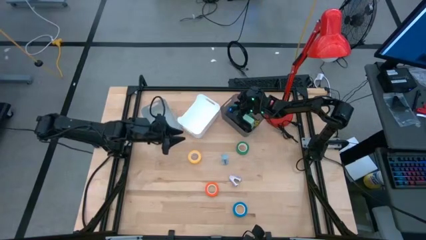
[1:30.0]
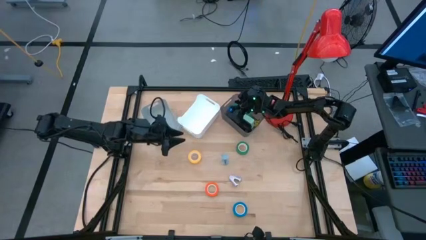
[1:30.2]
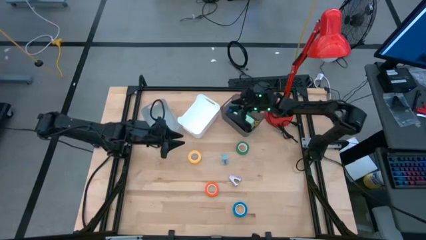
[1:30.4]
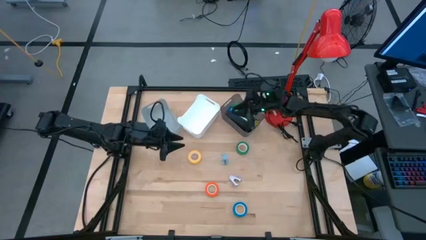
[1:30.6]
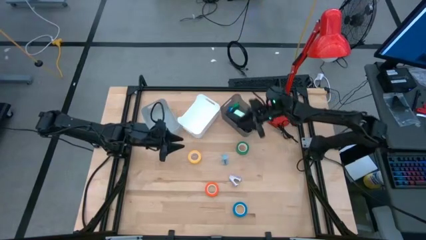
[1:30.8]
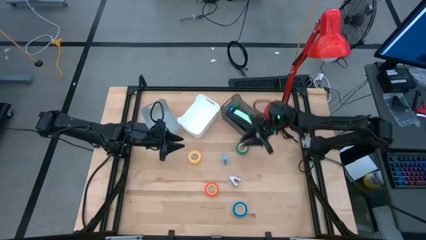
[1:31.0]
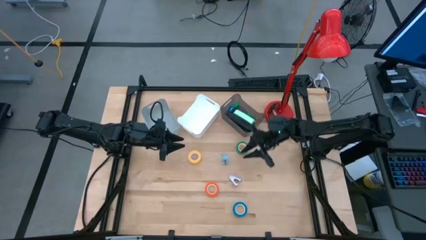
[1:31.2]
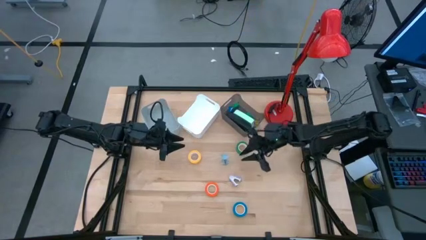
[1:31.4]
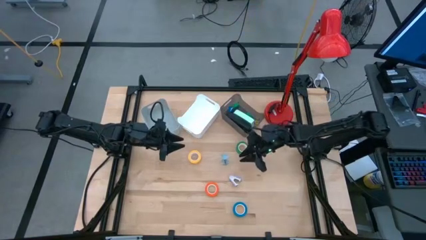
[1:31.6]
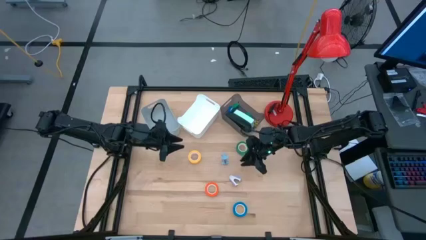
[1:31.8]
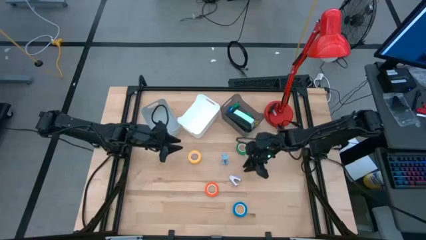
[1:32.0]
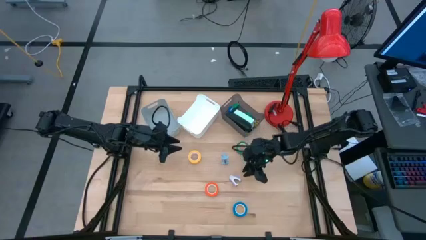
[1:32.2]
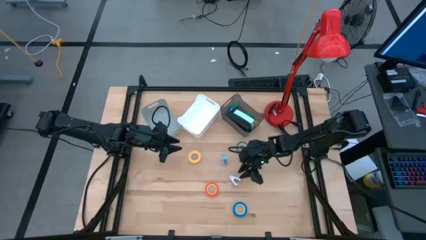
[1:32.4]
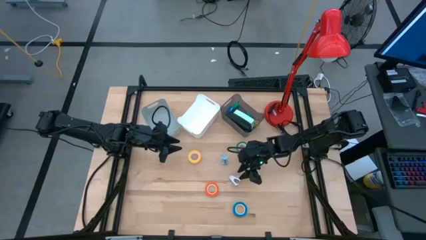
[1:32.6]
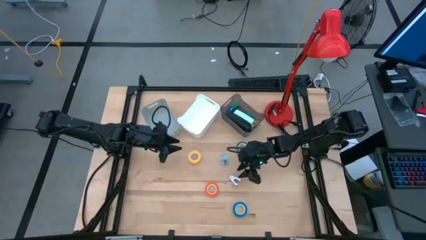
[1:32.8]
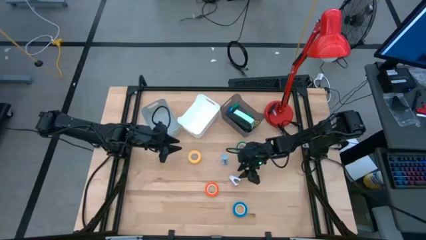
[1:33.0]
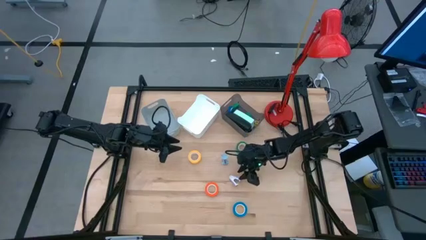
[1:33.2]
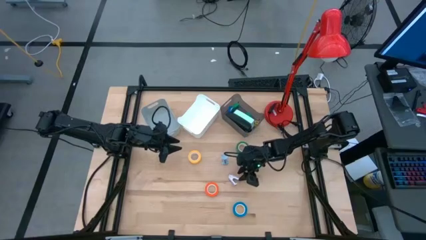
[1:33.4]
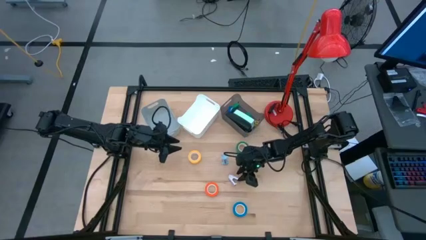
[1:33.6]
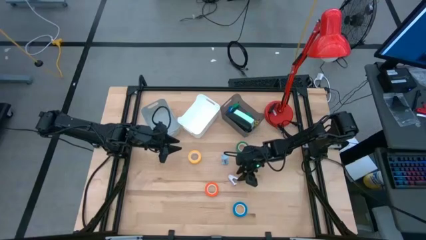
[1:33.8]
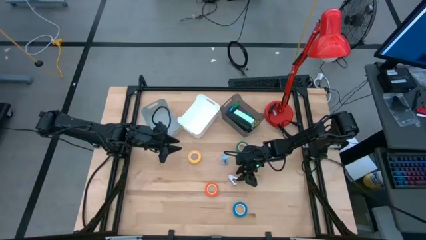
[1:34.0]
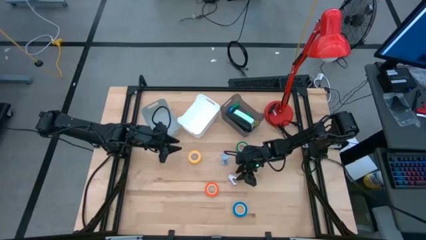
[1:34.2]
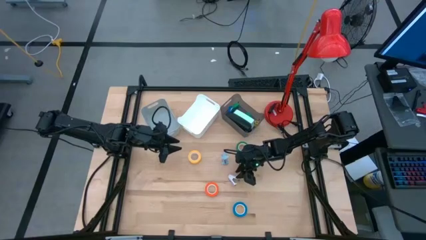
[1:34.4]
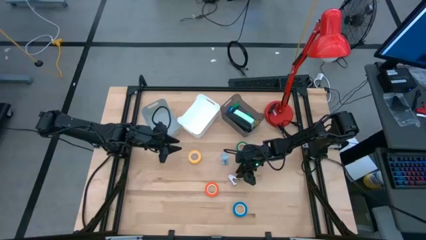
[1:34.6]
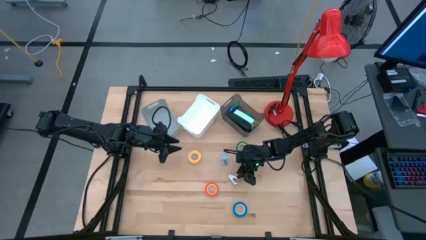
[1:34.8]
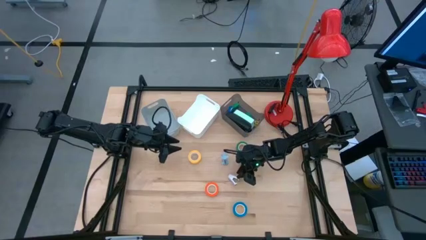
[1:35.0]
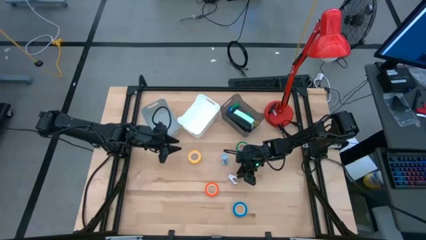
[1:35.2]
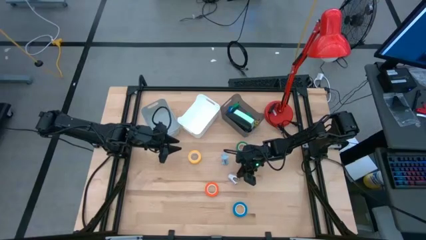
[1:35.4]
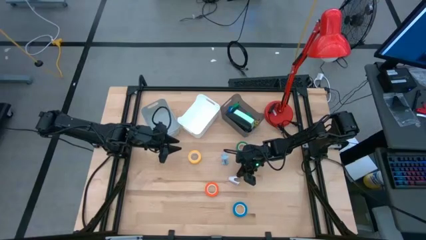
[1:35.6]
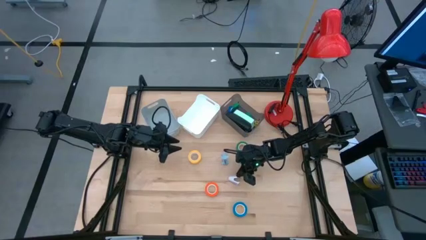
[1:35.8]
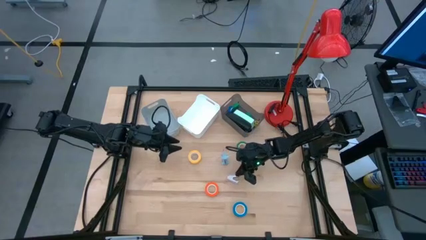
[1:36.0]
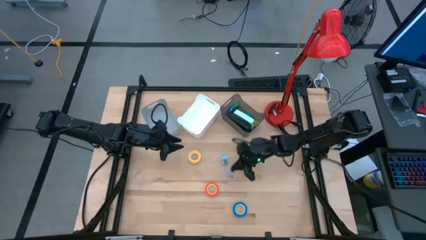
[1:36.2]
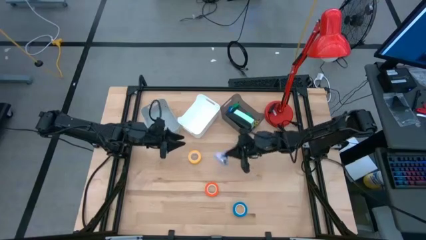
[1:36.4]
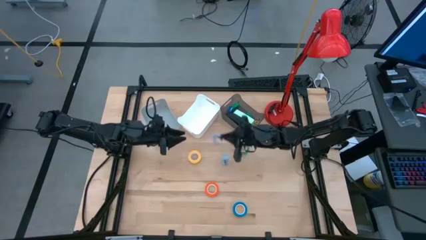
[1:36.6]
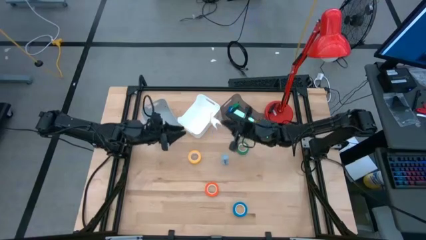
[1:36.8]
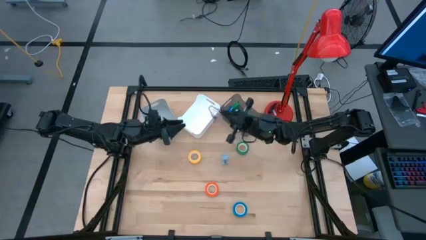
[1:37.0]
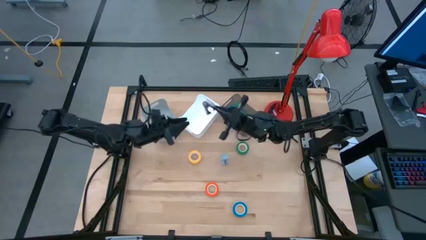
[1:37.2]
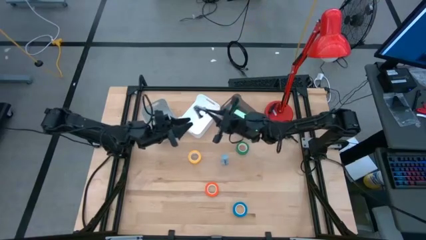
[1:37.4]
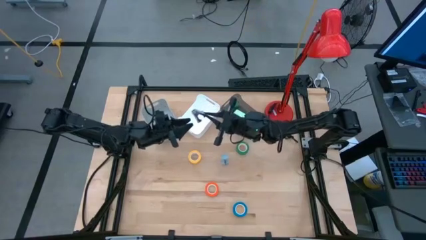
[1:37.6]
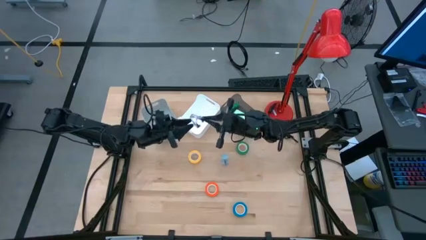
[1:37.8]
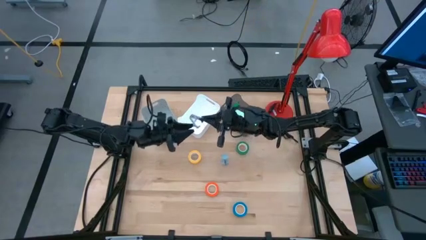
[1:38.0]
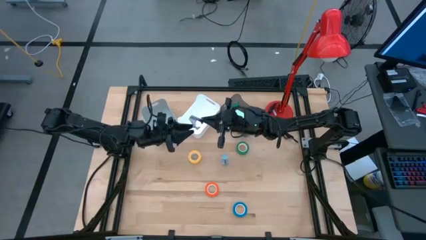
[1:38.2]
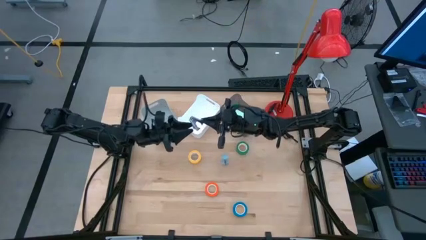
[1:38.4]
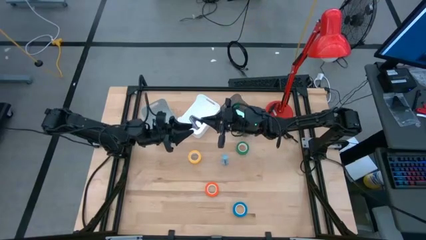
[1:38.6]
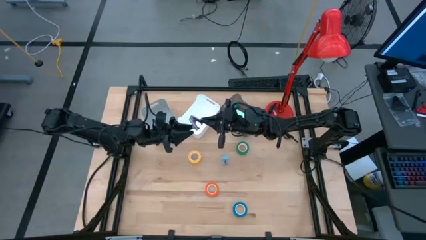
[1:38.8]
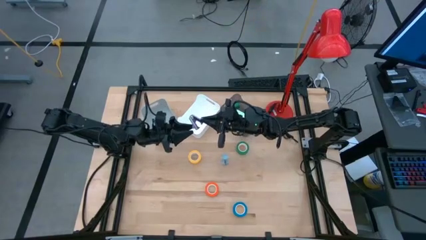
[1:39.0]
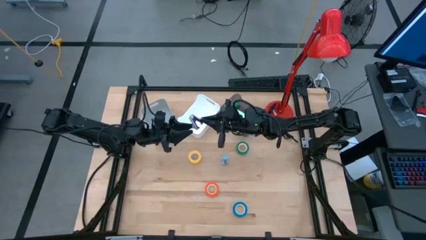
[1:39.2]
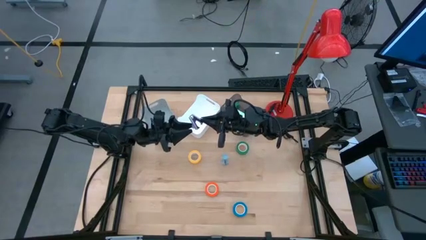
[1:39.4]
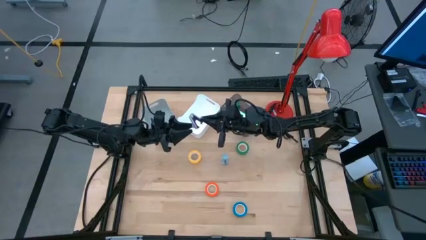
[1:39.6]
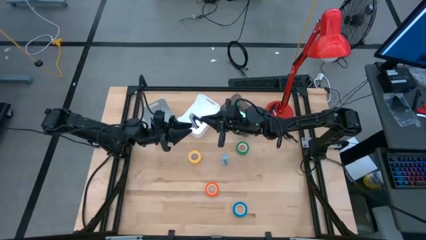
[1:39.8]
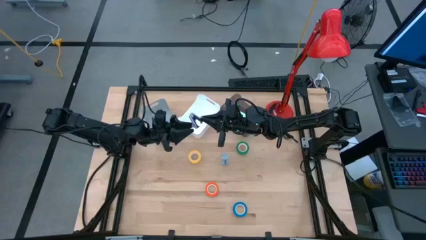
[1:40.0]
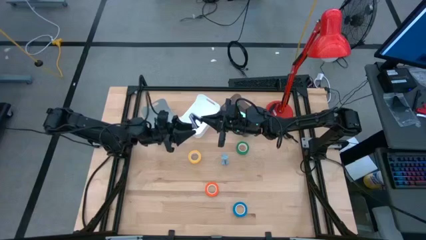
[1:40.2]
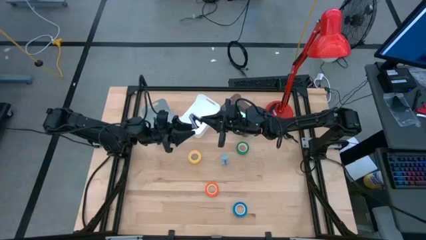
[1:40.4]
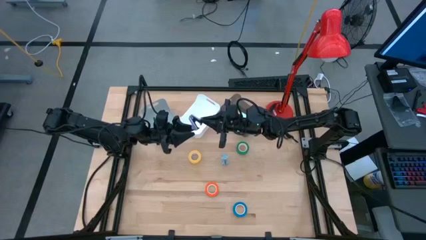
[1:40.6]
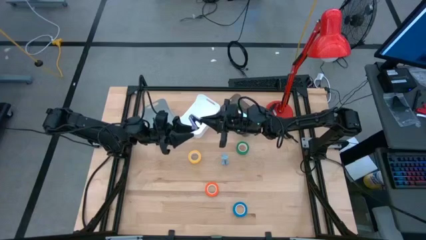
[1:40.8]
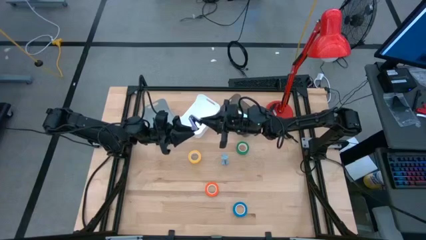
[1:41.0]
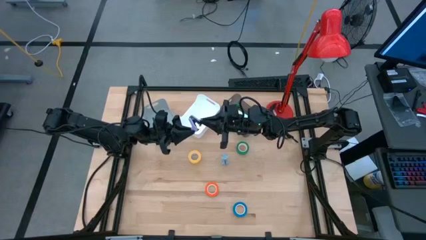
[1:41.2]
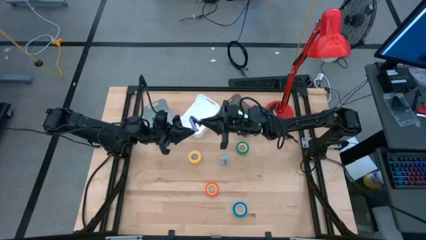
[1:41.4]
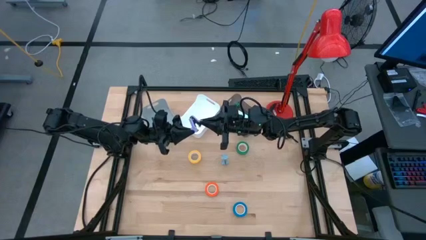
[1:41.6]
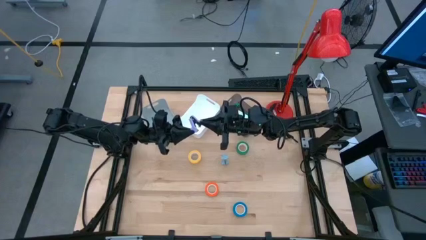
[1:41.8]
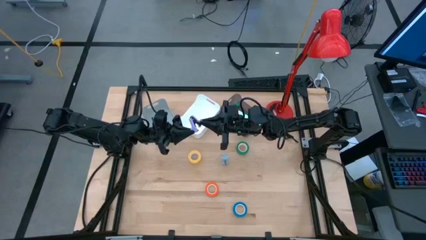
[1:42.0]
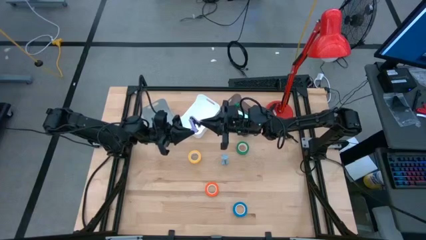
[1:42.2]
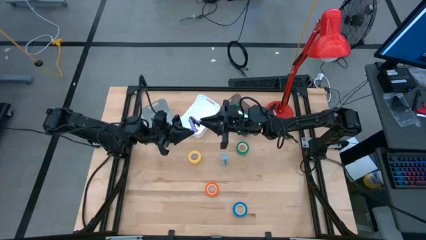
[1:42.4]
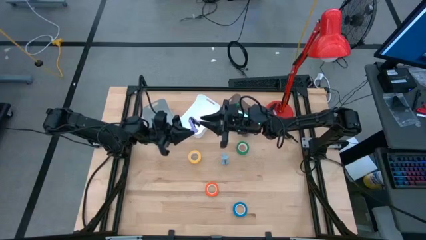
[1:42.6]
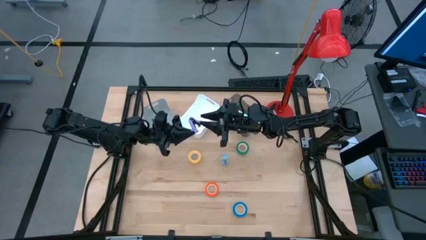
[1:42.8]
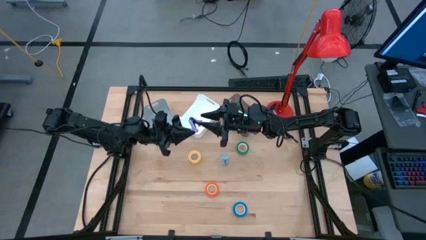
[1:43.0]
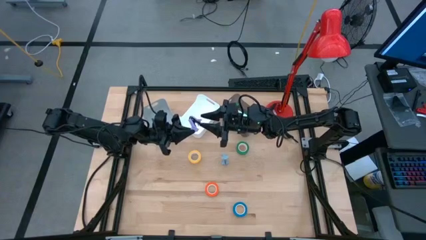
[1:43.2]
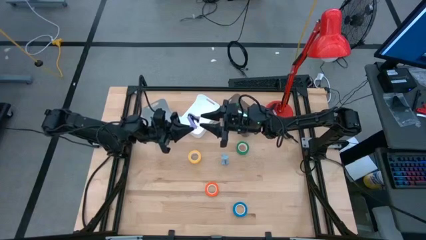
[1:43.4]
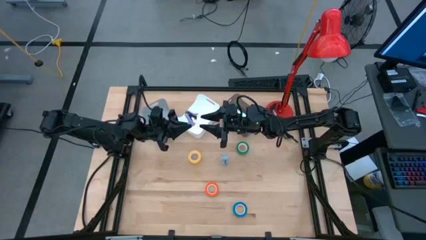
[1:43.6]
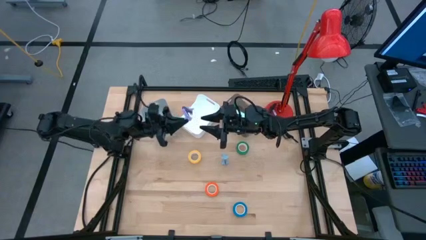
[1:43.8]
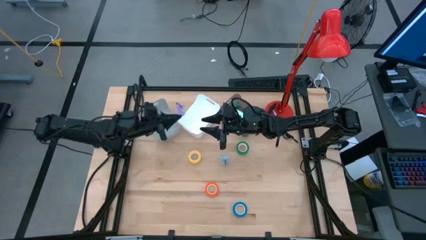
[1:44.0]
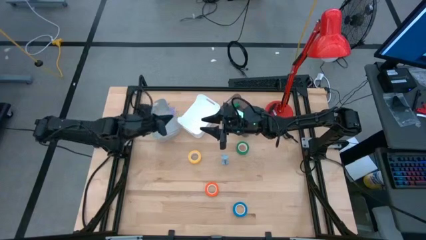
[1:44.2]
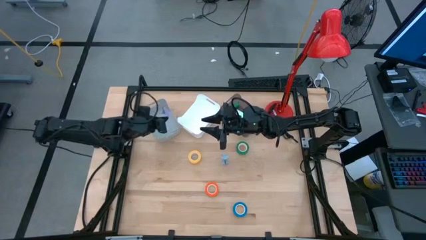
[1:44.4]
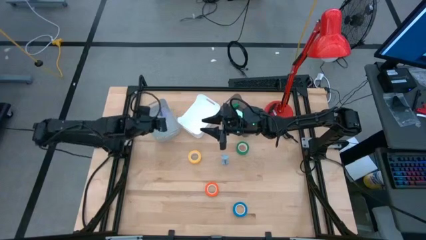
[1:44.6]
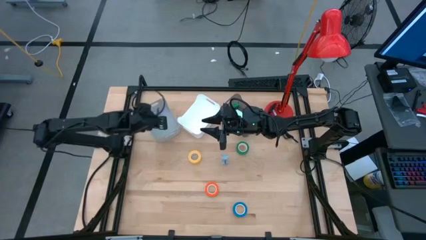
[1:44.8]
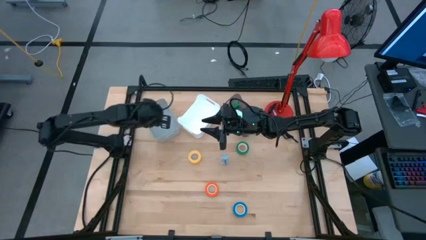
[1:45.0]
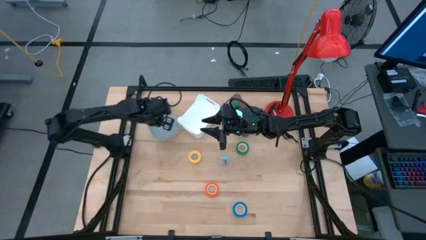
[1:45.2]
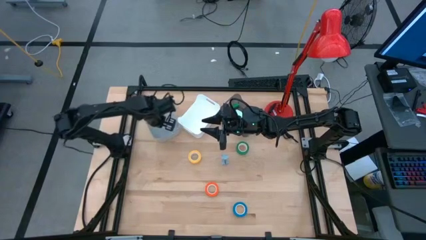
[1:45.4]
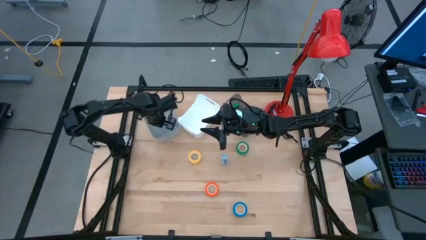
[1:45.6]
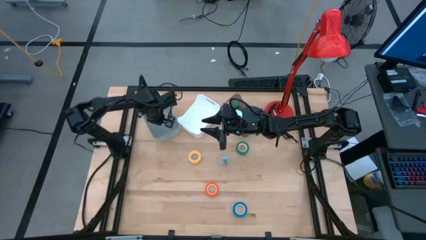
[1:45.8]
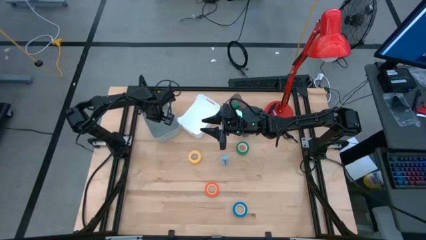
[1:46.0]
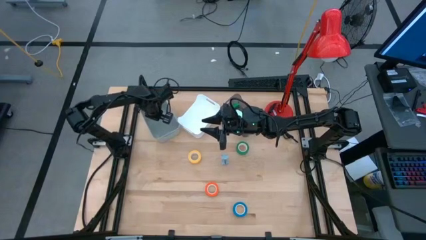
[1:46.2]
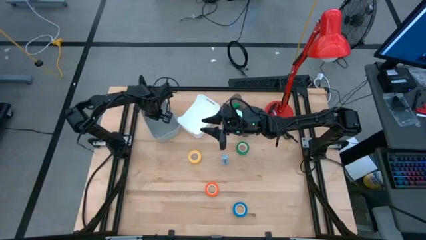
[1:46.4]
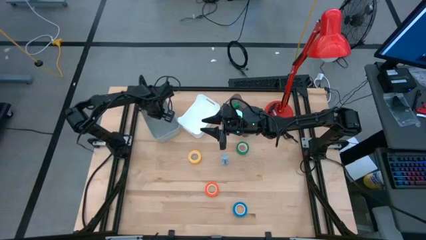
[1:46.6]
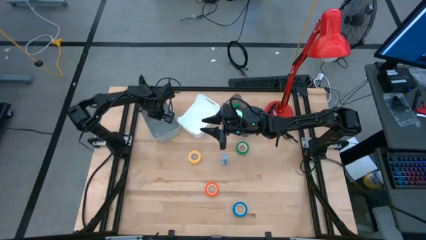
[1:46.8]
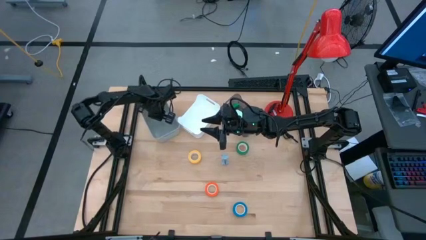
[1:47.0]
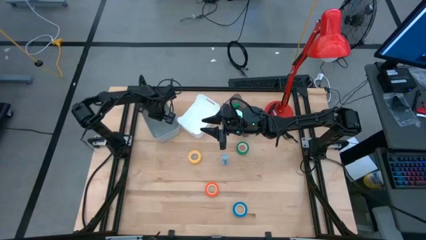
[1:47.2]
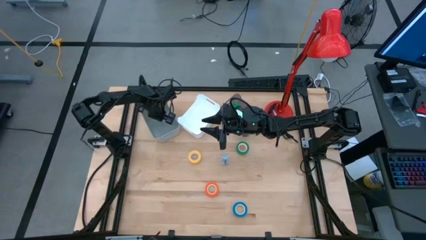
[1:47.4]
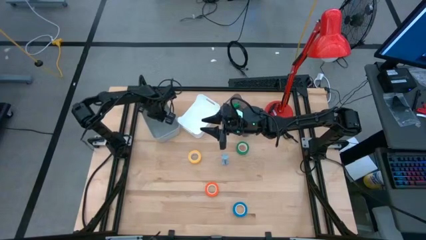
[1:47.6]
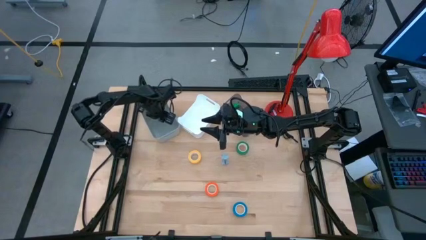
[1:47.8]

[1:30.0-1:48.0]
Task: Pick and place Stapler, Stapler remover, tape
Put the violet staple remover into the gray bin
